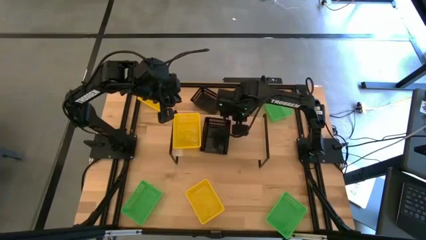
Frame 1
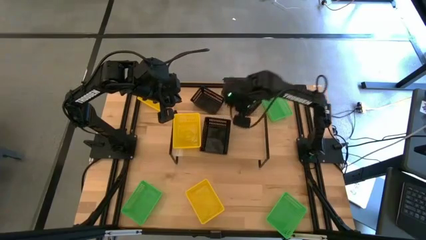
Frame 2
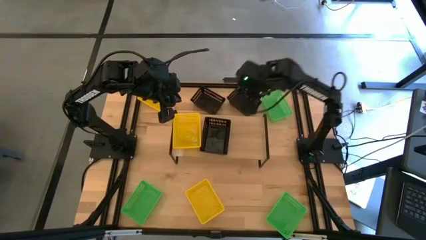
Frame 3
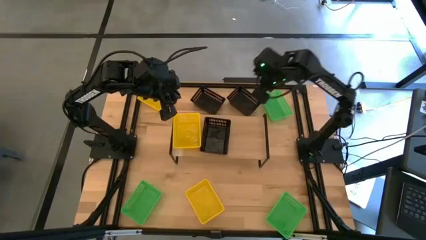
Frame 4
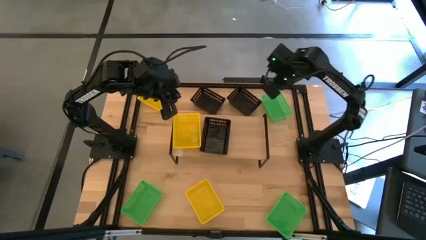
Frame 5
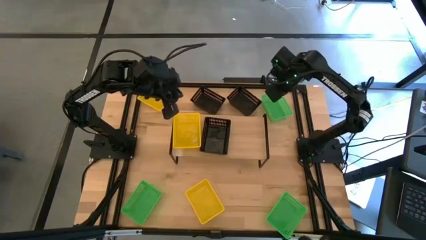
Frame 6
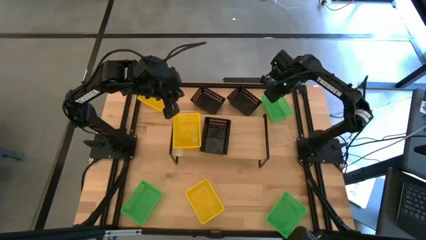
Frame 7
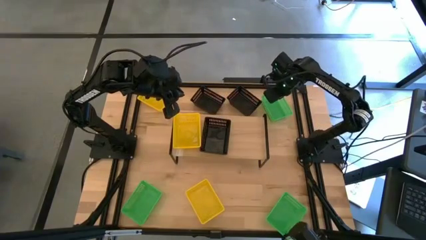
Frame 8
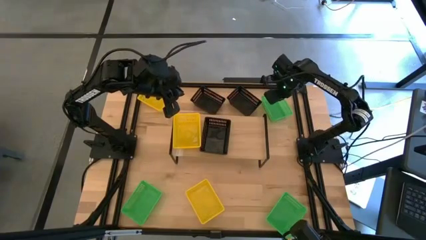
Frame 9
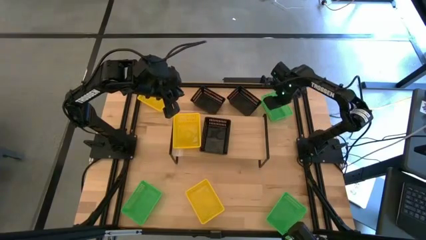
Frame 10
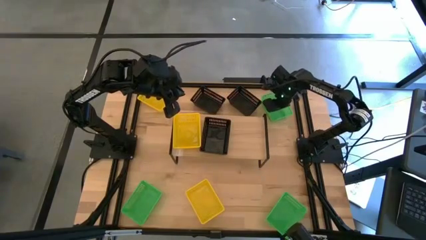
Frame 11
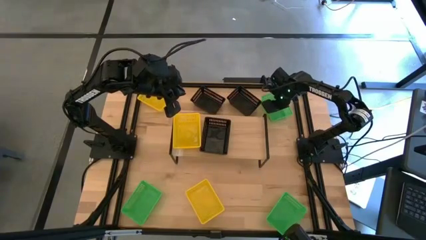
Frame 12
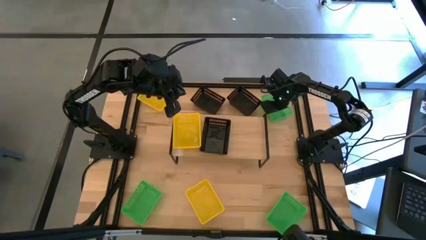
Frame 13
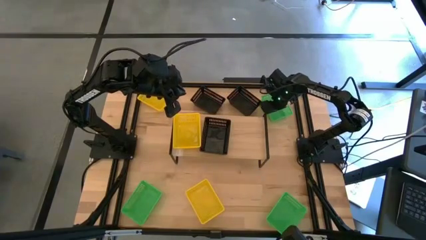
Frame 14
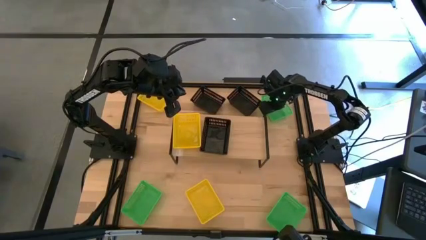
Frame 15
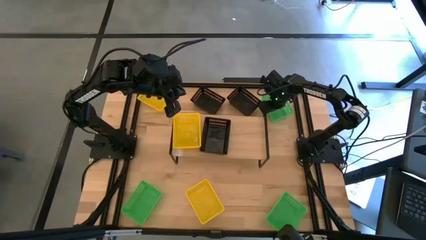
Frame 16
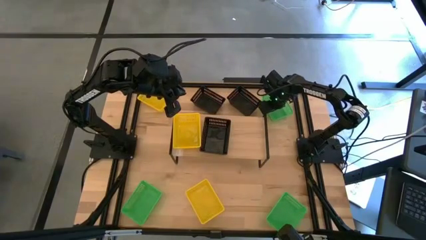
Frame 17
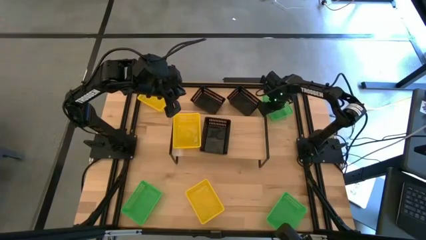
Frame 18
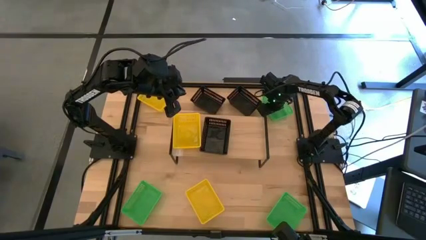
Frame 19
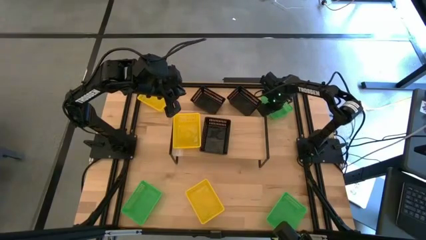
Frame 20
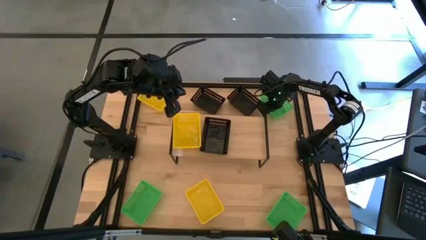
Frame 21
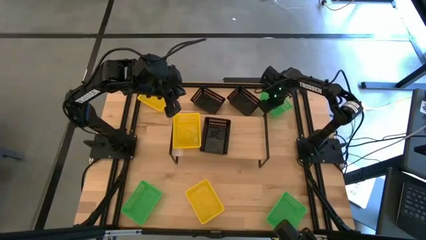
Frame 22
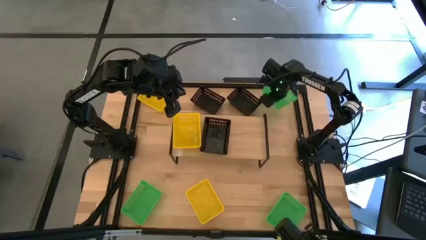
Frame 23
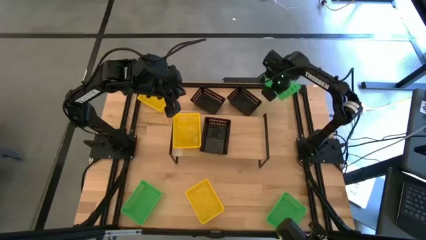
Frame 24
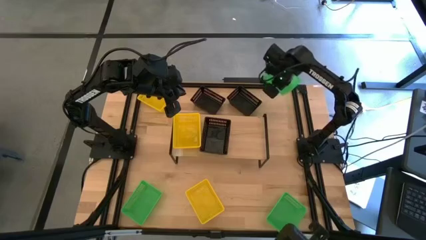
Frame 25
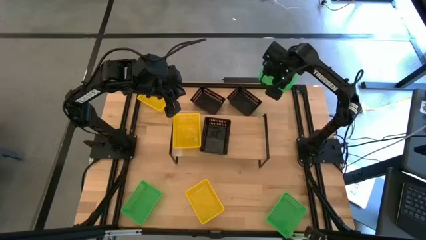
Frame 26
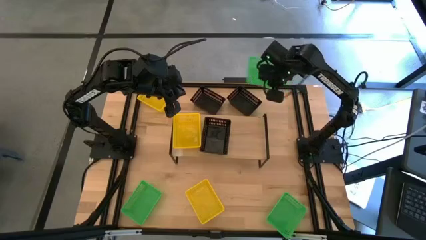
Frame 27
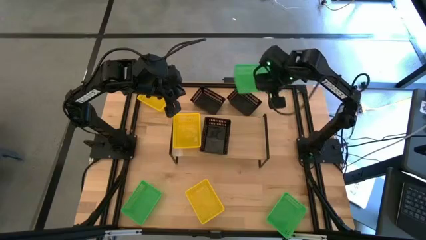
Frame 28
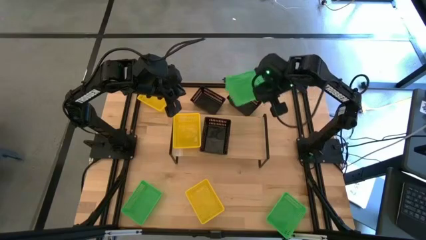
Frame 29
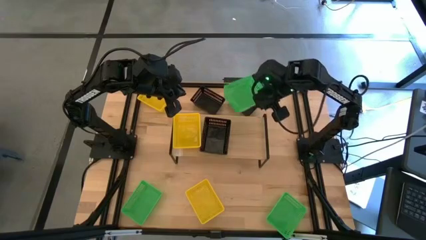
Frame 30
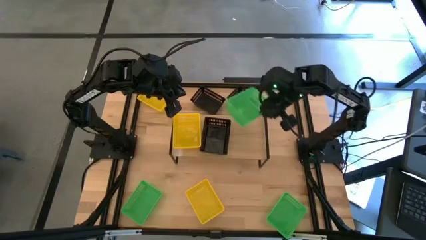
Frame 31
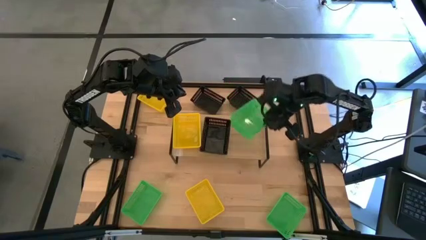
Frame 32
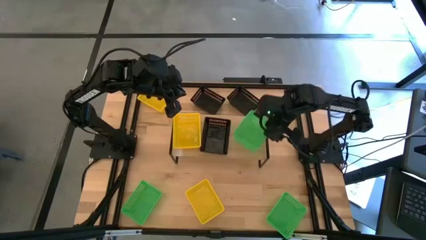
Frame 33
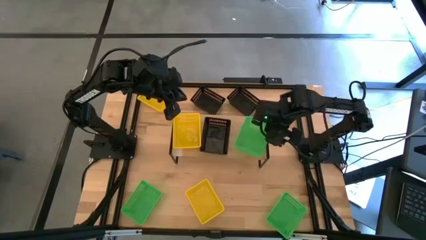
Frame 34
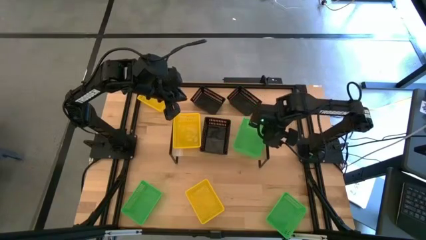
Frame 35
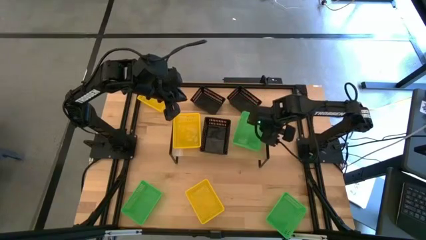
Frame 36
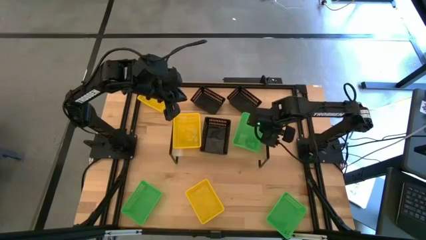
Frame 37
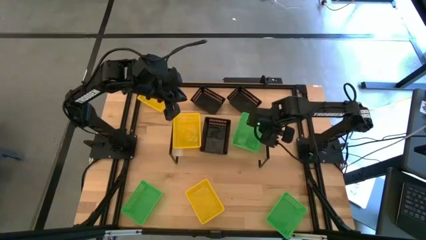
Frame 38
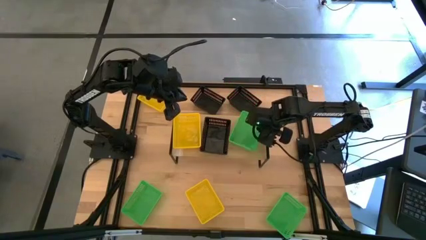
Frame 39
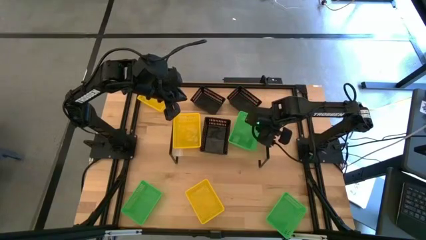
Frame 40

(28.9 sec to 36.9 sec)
Task: Stack baskets on shelf by color
Put the top right green bin on the shelf

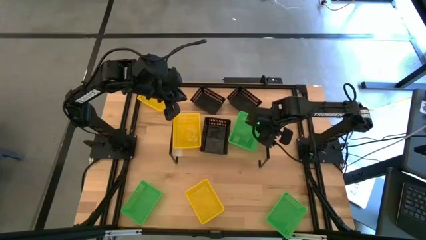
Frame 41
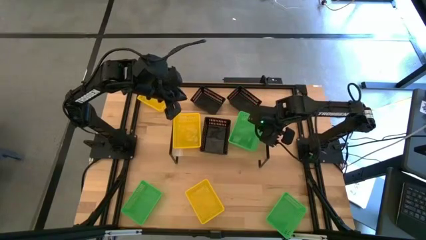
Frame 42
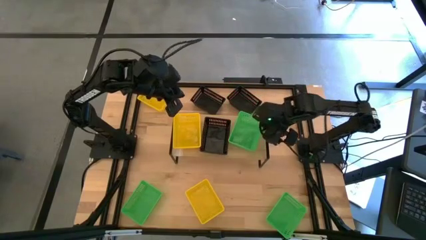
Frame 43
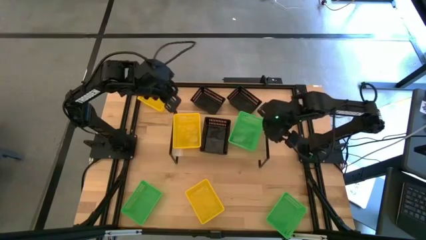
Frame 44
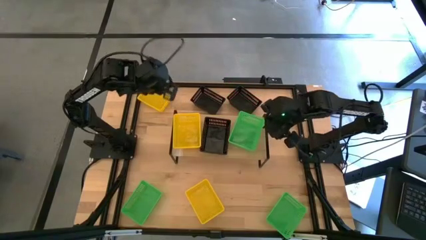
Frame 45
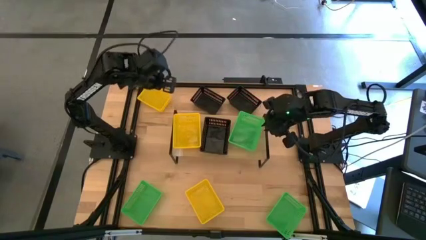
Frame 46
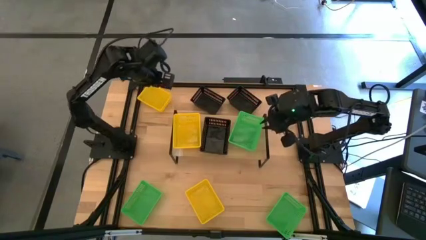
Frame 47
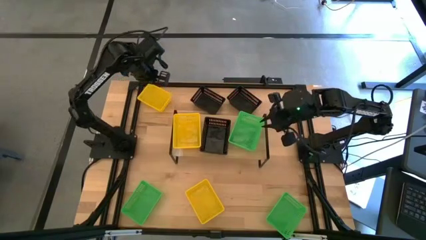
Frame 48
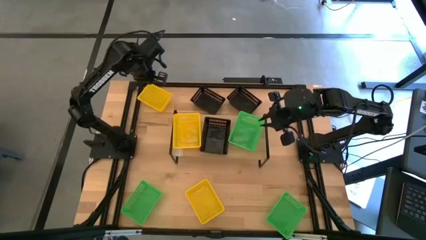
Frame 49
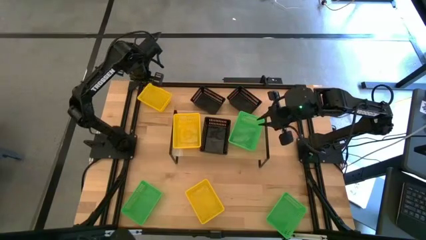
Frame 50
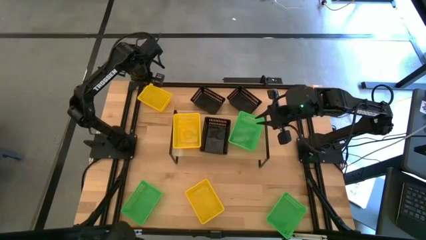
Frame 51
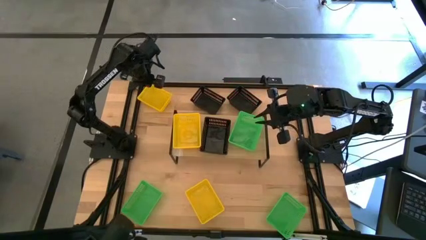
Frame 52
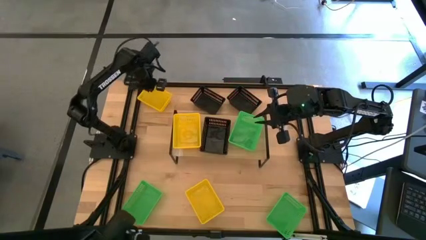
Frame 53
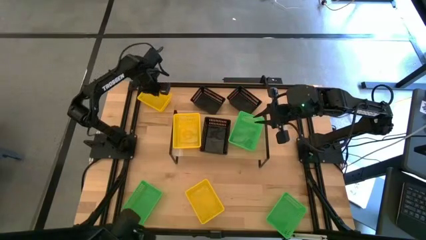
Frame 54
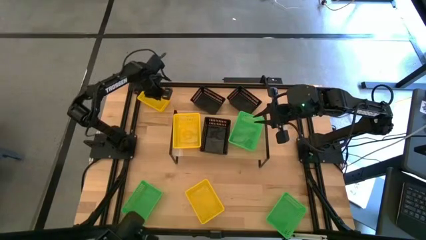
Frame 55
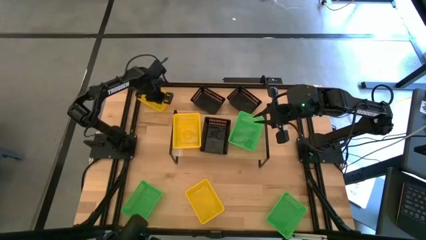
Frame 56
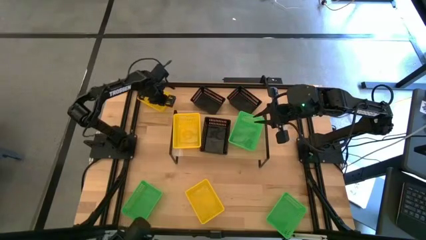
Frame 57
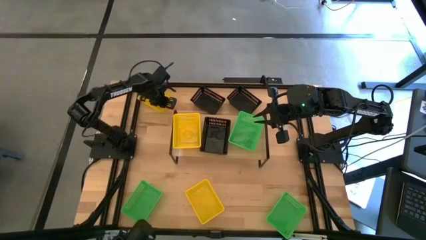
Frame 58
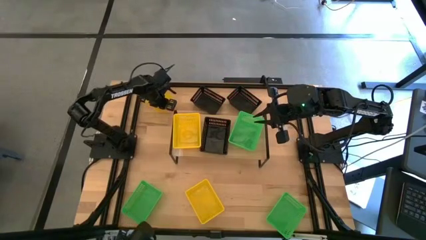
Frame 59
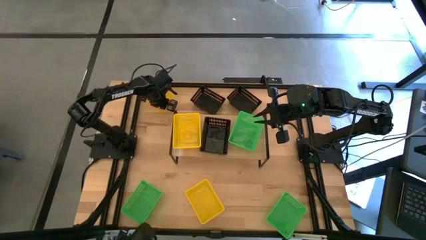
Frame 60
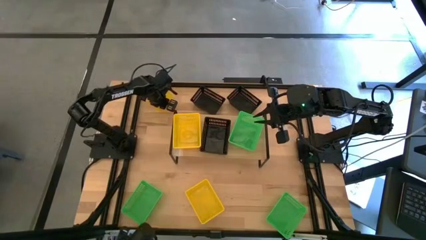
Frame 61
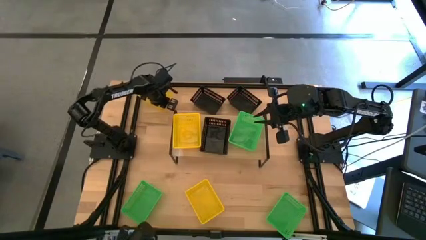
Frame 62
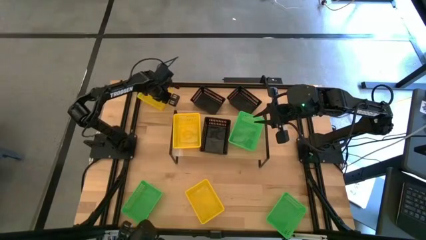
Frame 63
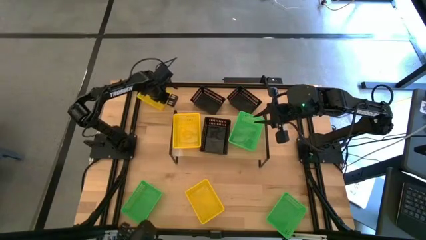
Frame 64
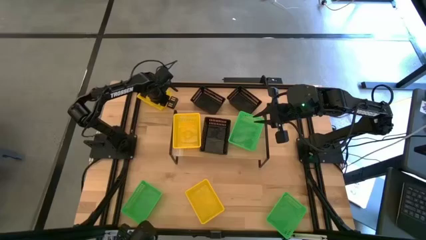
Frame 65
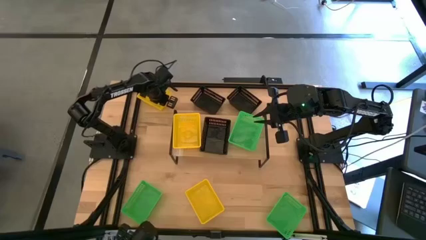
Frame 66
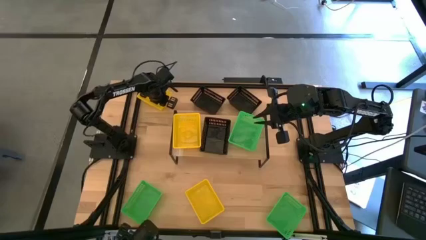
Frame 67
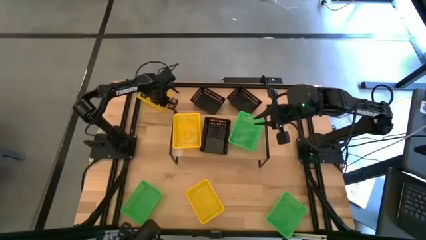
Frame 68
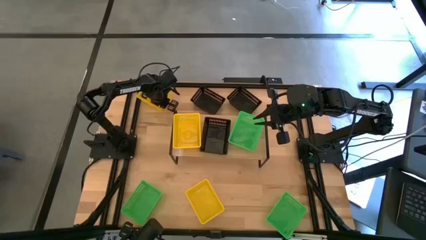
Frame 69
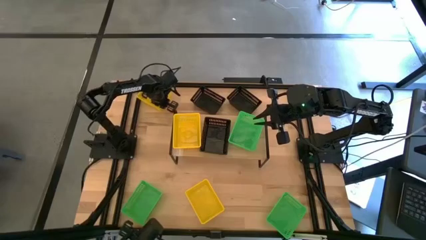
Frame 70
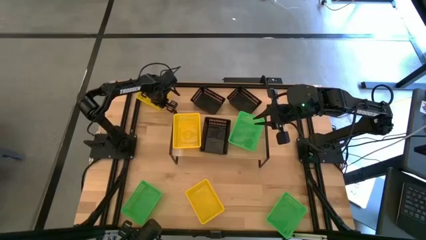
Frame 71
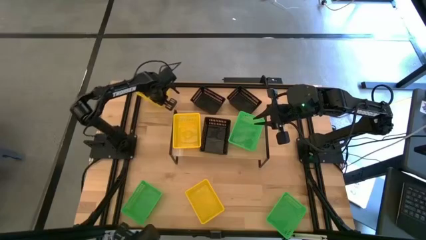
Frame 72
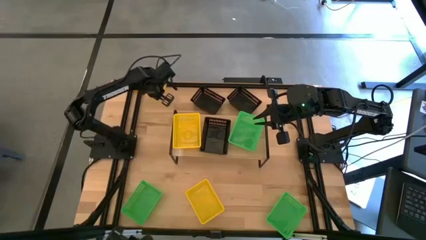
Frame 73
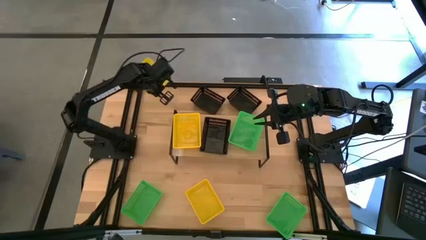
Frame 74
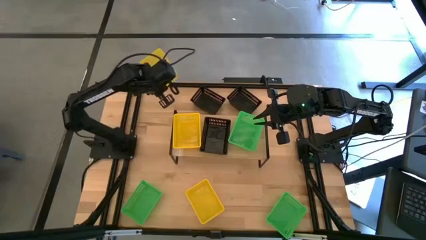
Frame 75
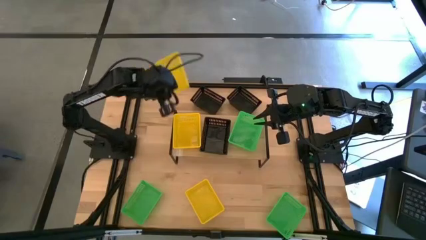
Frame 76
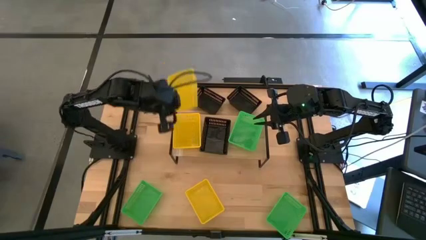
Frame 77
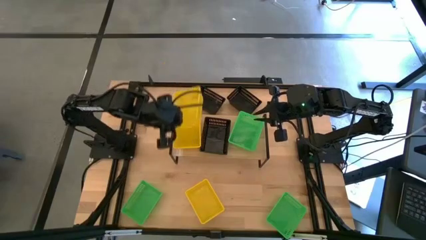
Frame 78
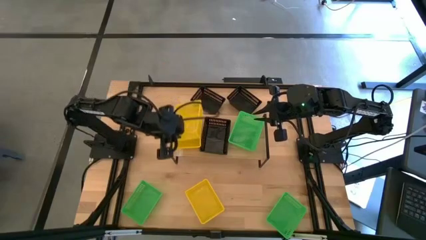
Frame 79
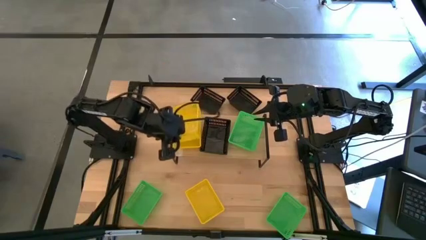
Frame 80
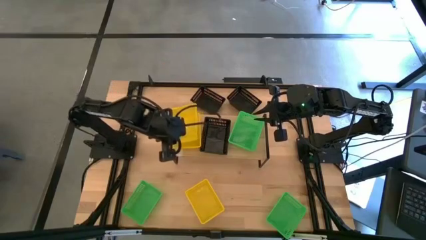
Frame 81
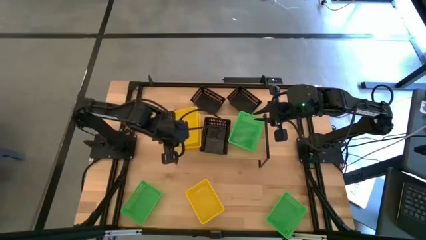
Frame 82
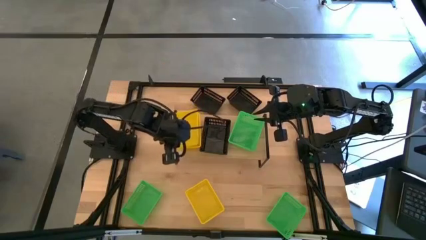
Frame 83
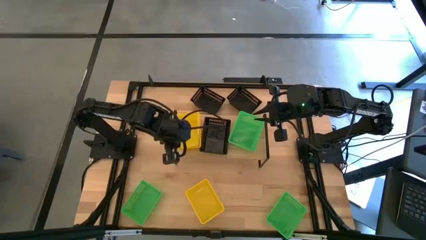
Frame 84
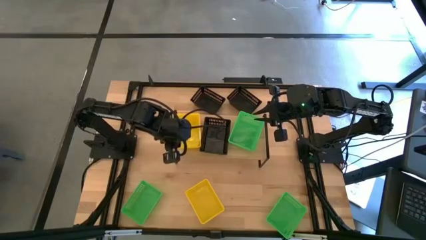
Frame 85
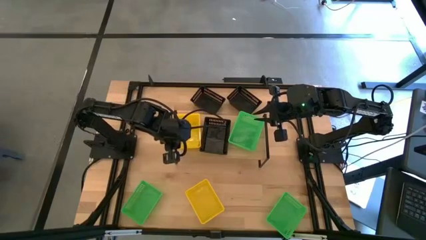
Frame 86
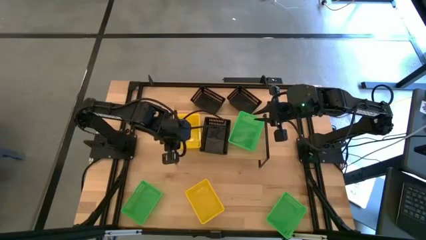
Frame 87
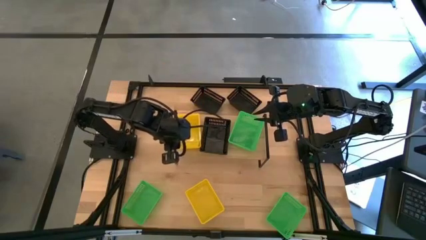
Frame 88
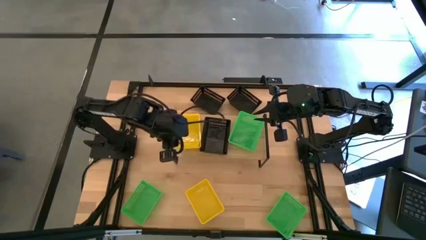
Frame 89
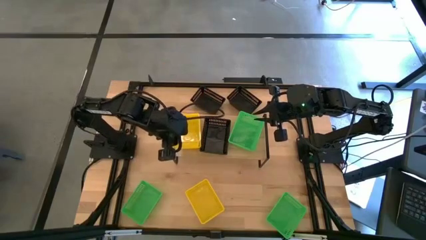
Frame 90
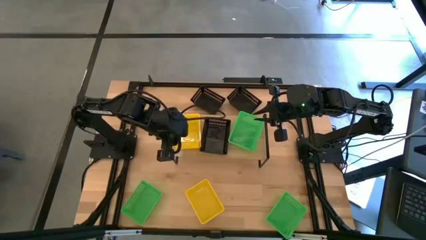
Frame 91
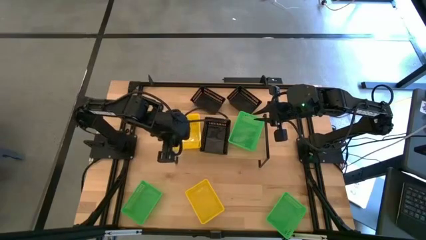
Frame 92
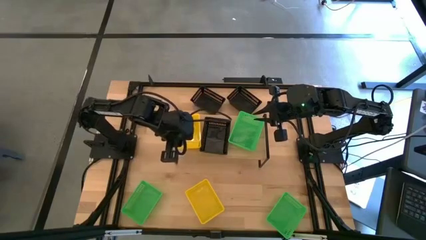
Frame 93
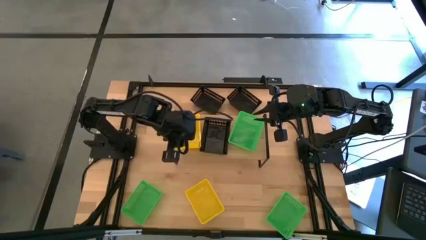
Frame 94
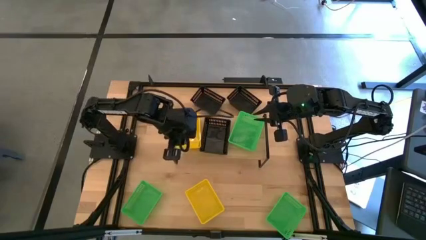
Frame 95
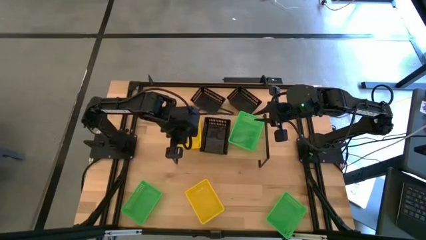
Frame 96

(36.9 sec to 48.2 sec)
Stack the top yellow bin on the other yellow bin on the shelf
